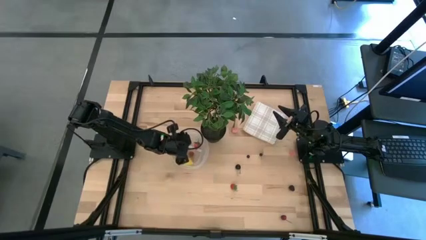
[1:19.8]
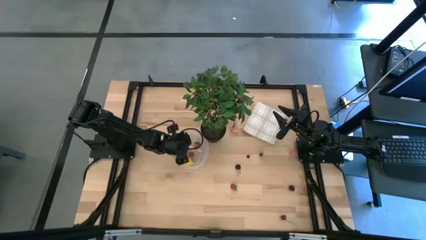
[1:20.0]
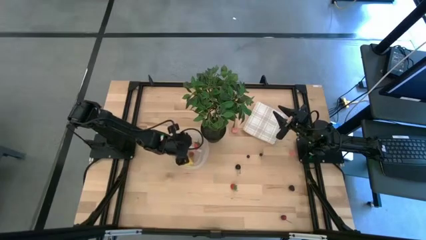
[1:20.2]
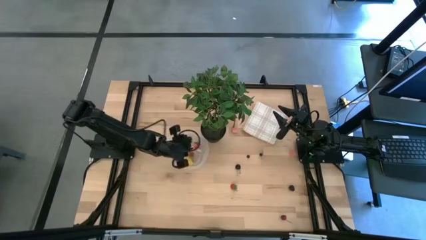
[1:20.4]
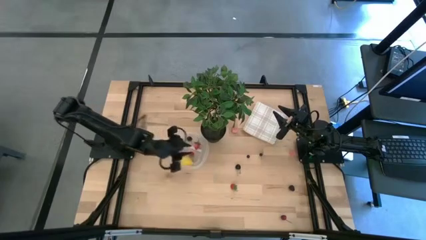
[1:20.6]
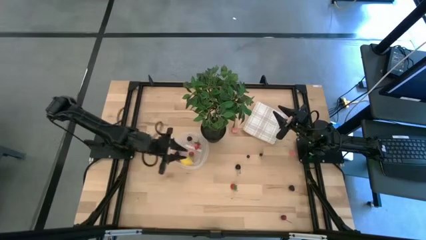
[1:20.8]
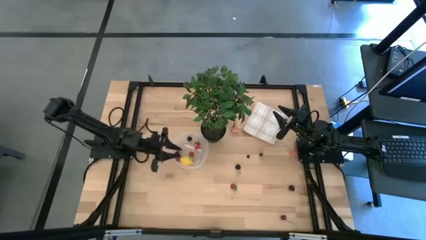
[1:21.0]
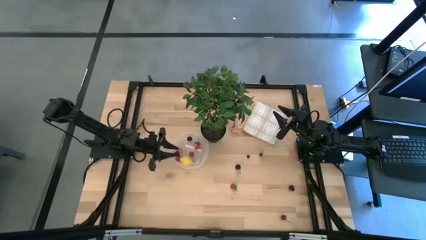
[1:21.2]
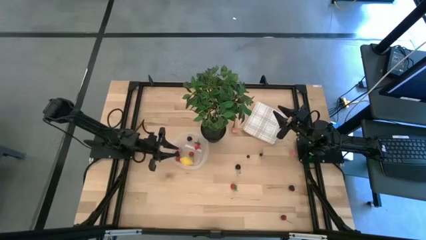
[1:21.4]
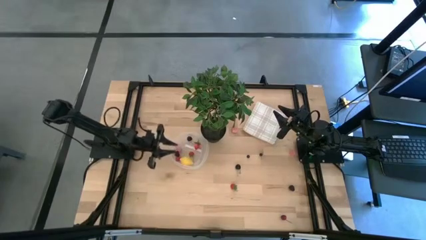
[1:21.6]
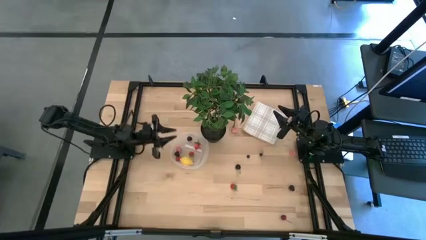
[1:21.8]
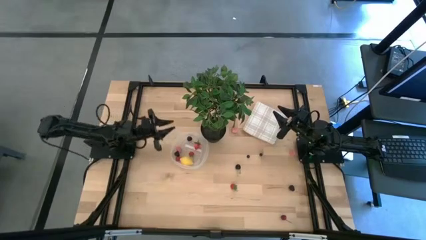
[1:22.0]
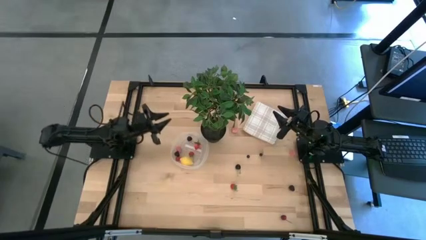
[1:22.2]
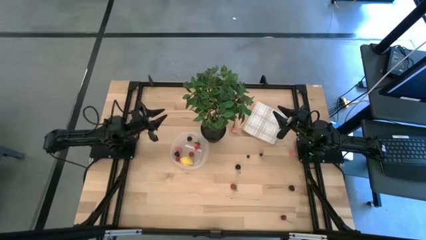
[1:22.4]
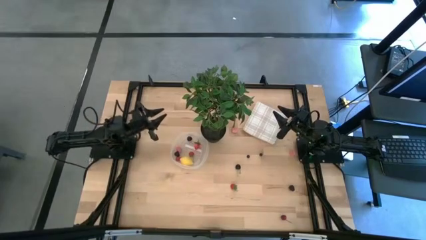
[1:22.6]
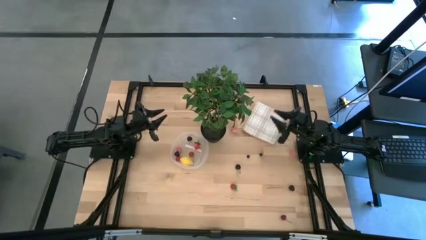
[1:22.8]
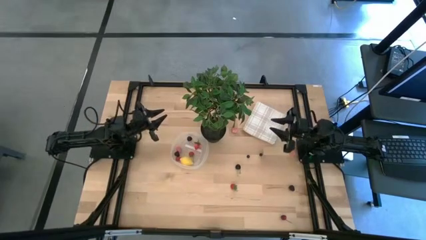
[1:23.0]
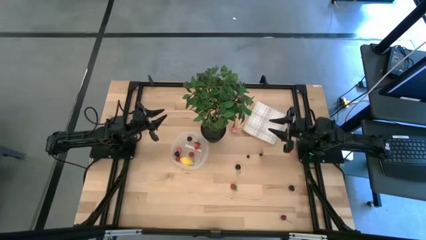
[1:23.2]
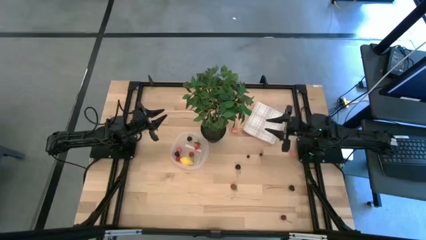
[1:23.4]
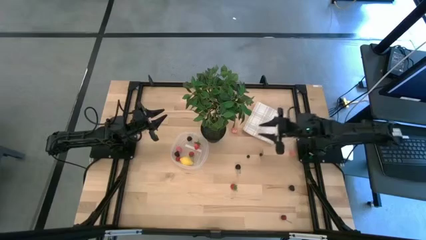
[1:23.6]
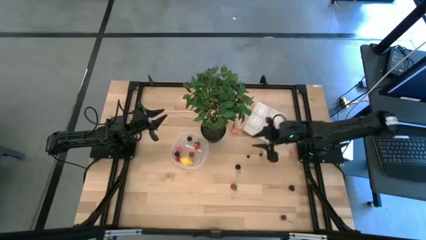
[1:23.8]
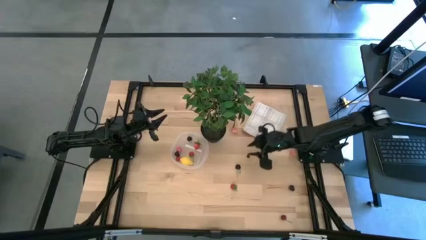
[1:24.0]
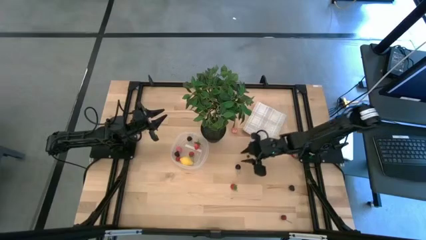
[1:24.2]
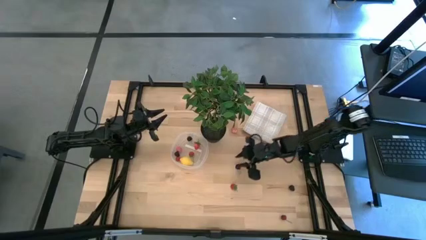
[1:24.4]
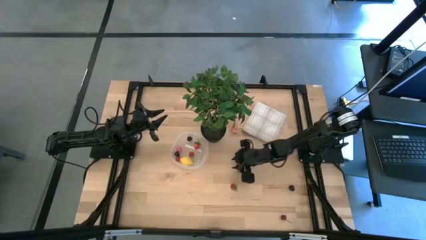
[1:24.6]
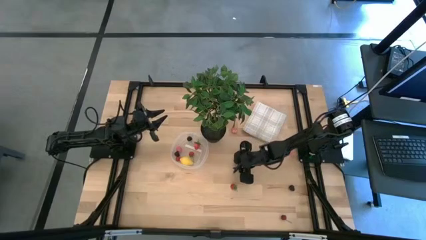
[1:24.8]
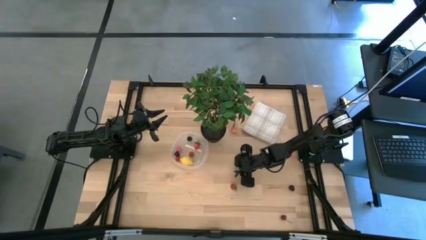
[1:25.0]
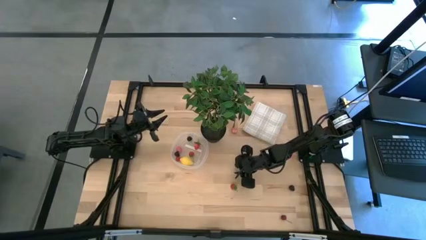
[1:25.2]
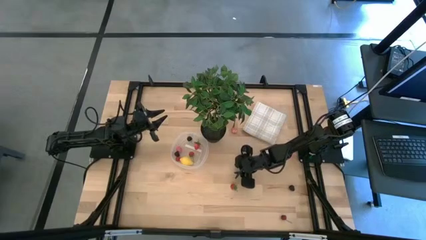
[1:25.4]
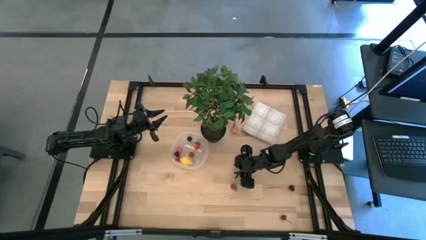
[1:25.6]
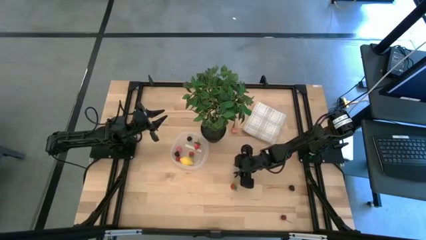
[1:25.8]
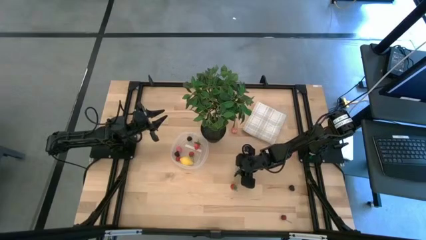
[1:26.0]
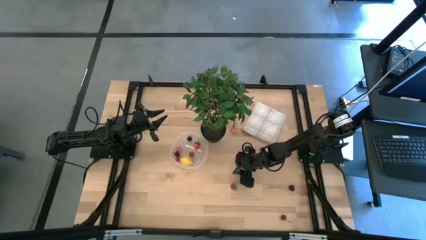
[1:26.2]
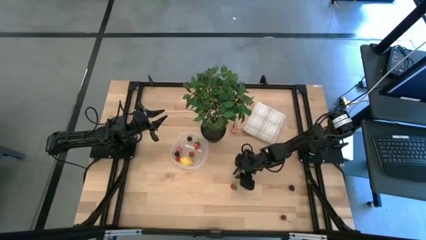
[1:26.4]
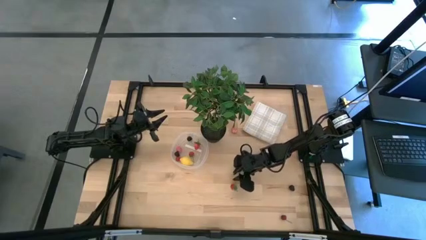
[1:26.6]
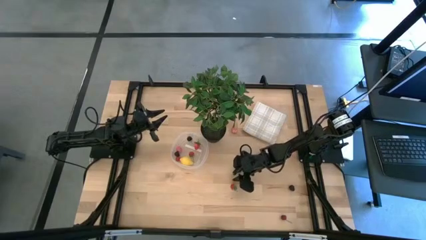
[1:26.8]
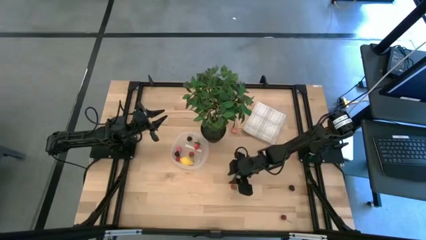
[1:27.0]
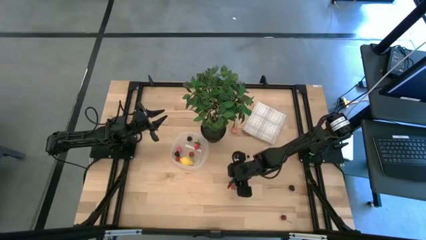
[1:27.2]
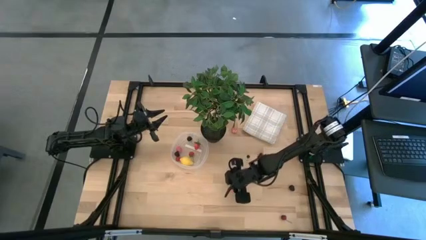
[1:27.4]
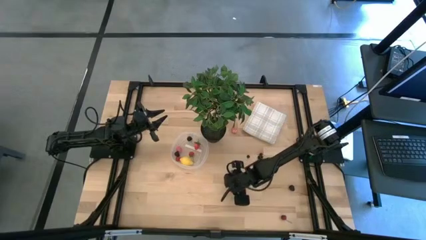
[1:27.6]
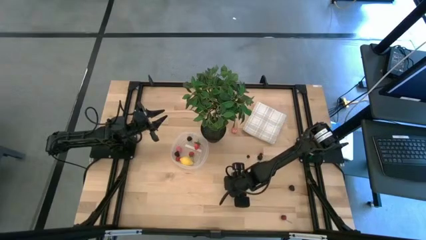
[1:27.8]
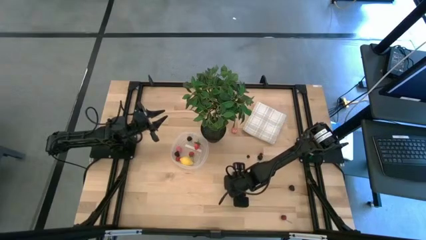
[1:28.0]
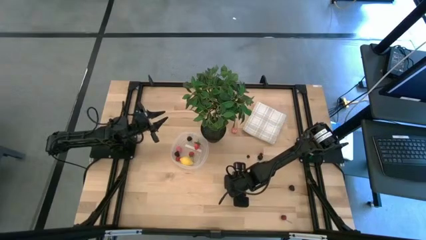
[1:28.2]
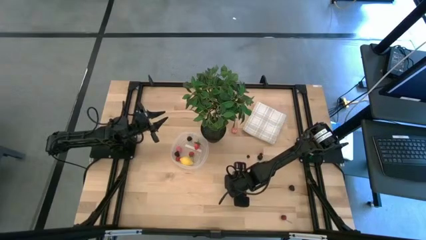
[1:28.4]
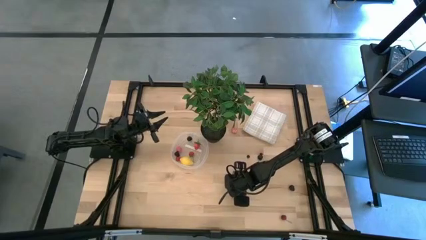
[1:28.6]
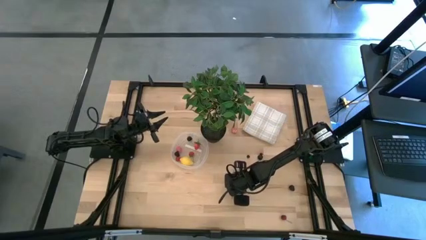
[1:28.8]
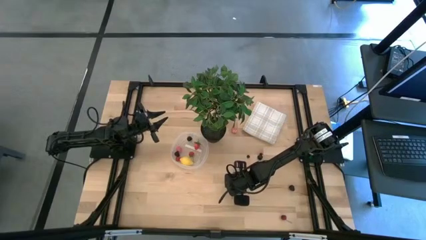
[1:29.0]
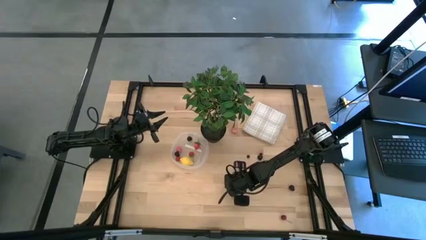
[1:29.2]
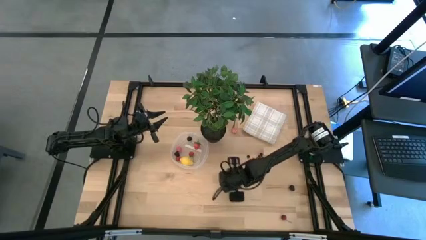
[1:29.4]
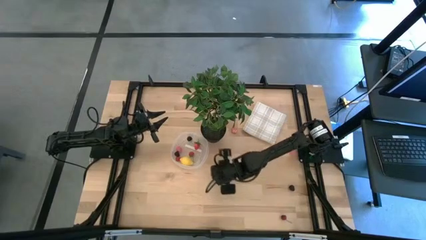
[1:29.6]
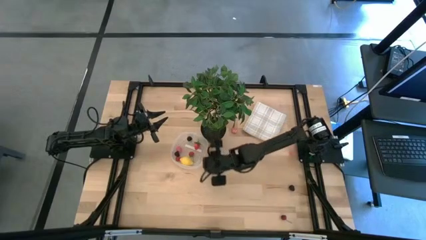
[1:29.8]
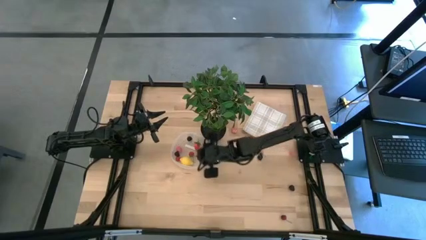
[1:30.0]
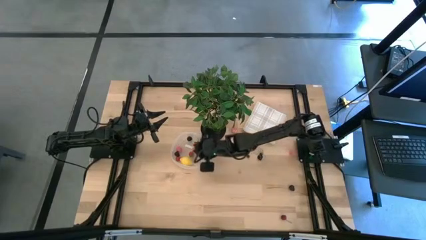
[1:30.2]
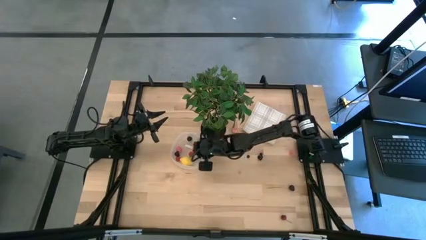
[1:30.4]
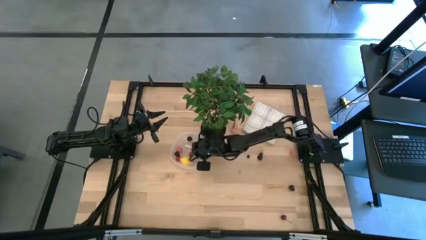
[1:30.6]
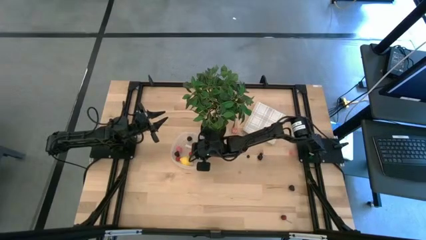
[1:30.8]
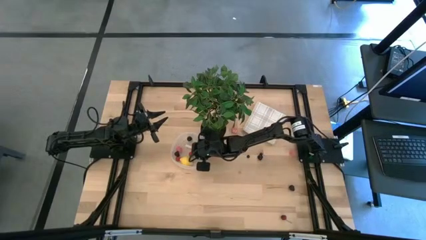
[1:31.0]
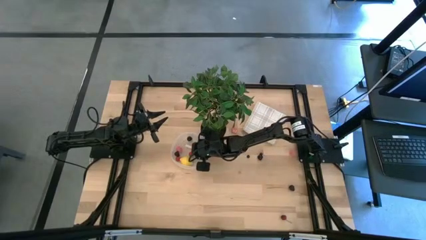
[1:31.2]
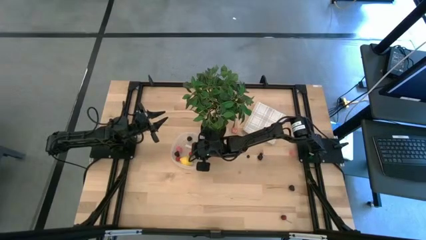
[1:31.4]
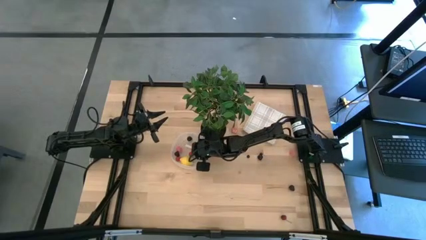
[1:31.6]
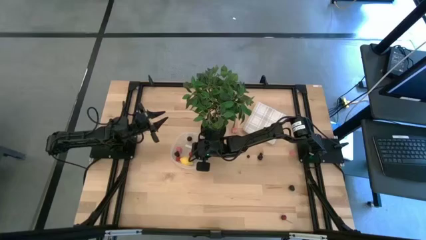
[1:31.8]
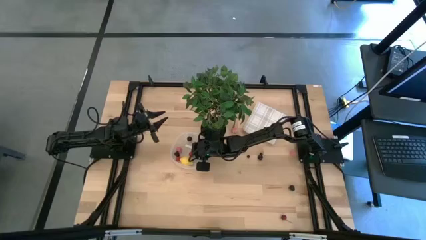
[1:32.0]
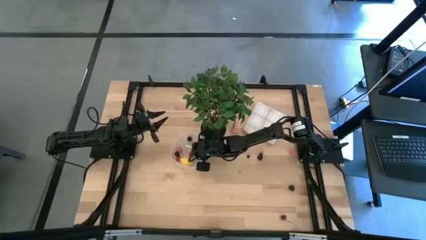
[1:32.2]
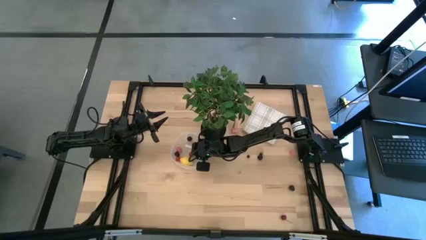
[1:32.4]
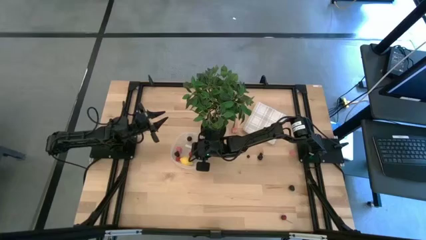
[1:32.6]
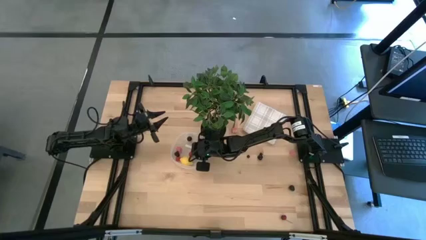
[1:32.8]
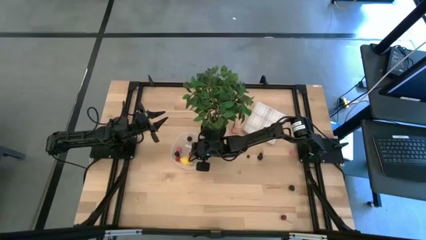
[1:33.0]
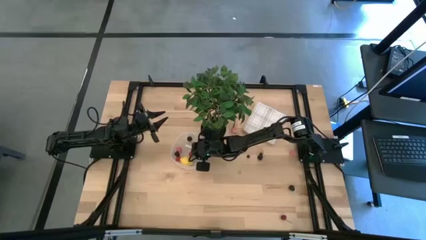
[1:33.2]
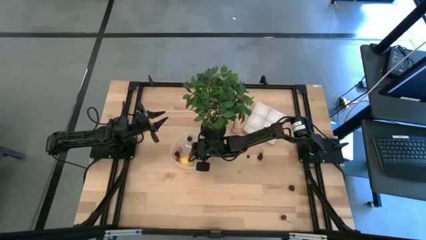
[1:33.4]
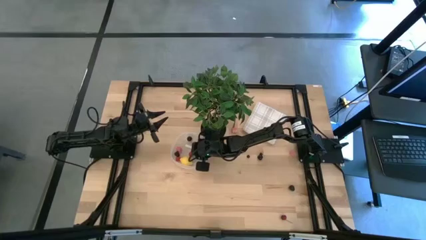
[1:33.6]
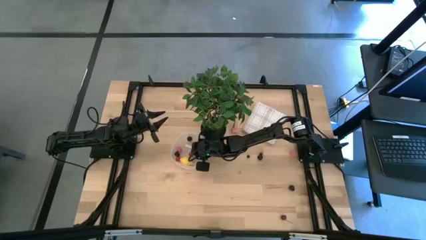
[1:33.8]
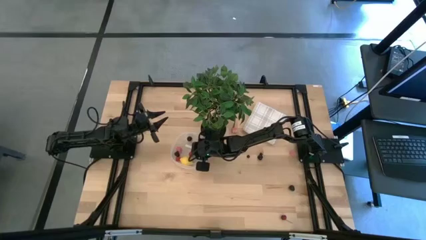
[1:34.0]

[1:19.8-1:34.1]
Task: Pick and placing Produce into tupperware
Put the red strawberry into the transparent bin
